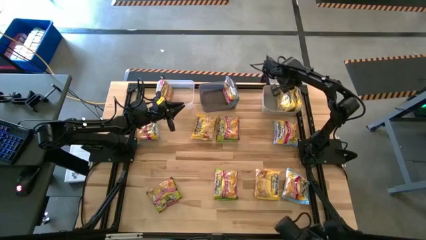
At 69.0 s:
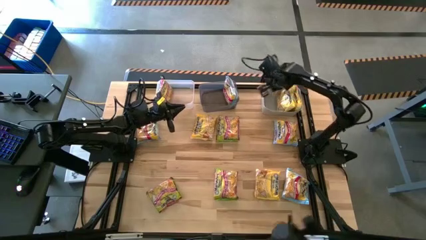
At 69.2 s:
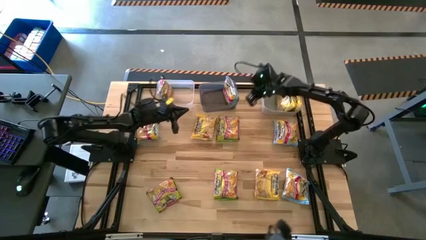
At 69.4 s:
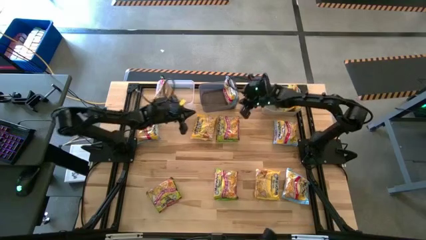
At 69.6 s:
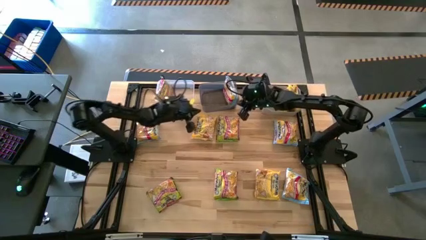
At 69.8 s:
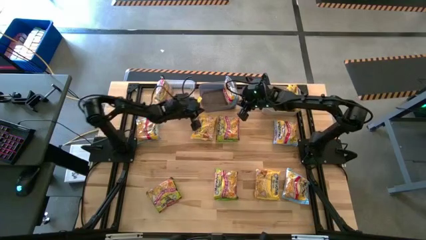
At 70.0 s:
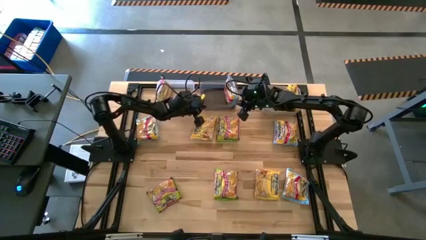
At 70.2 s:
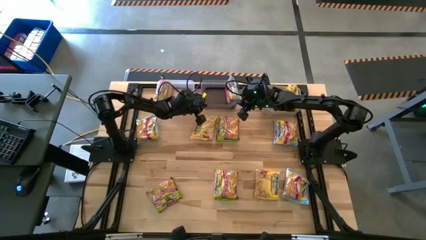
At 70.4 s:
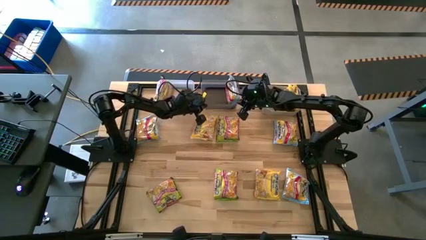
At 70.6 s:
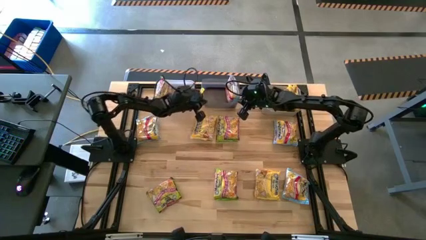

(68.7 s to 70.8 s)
Task: Sort Maruchan noodles
Adjust the black bin

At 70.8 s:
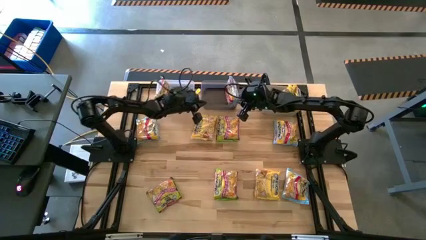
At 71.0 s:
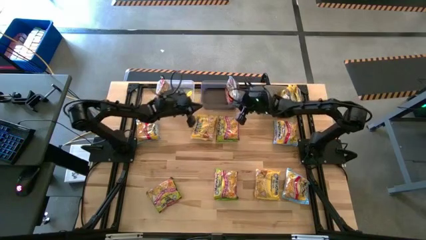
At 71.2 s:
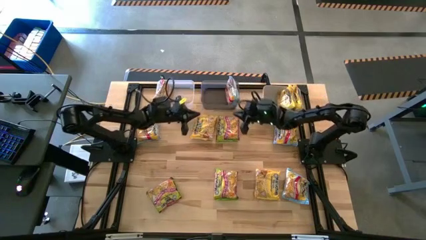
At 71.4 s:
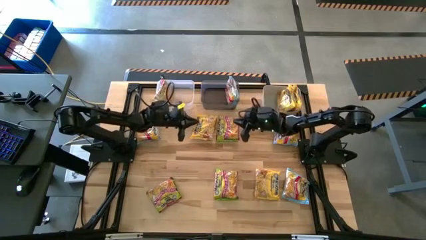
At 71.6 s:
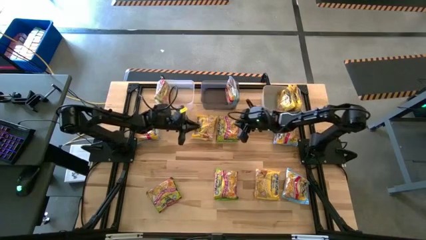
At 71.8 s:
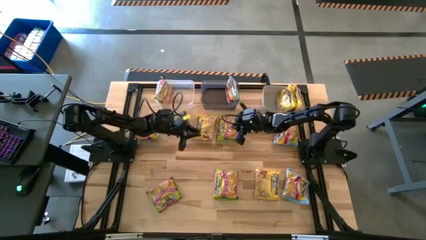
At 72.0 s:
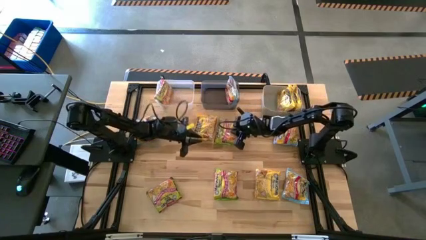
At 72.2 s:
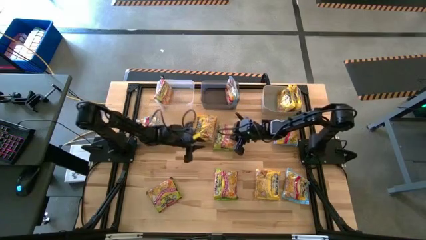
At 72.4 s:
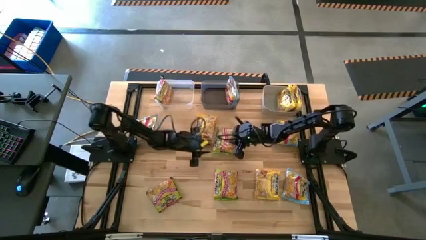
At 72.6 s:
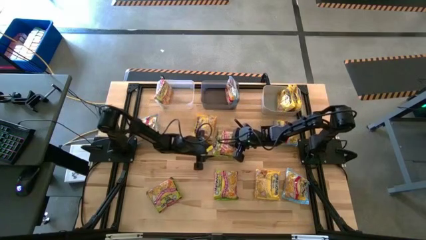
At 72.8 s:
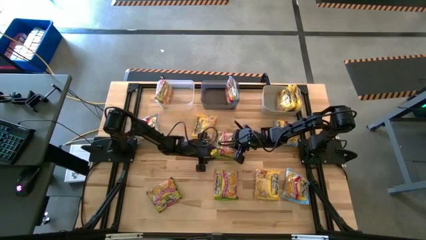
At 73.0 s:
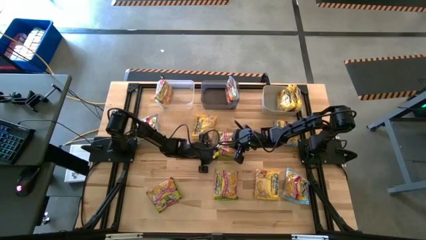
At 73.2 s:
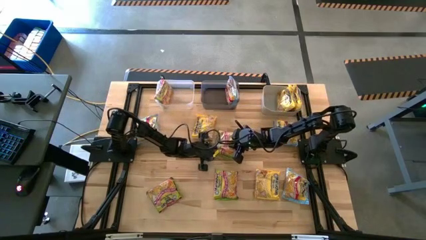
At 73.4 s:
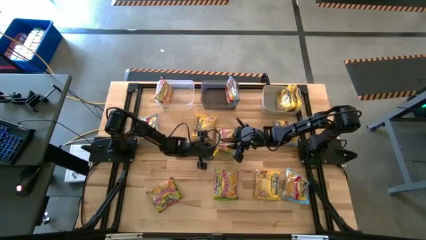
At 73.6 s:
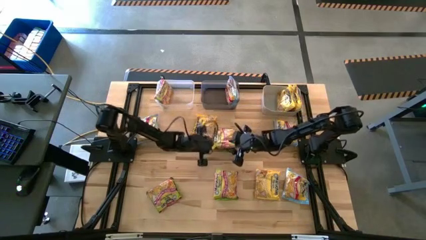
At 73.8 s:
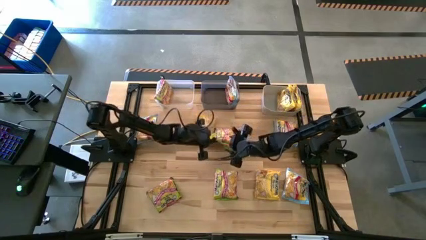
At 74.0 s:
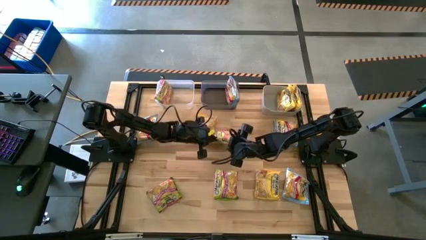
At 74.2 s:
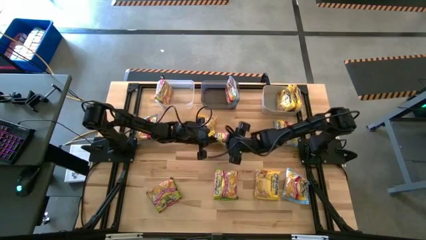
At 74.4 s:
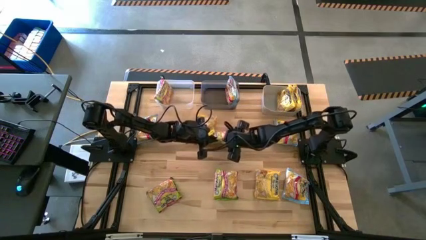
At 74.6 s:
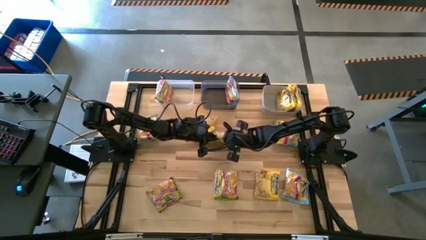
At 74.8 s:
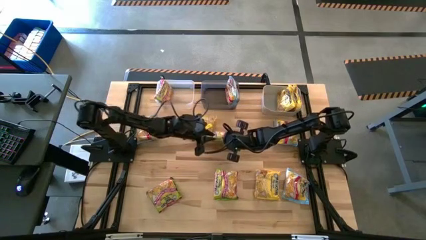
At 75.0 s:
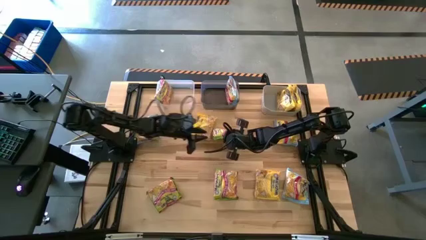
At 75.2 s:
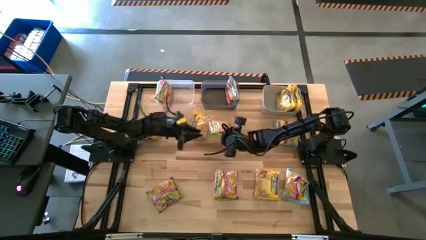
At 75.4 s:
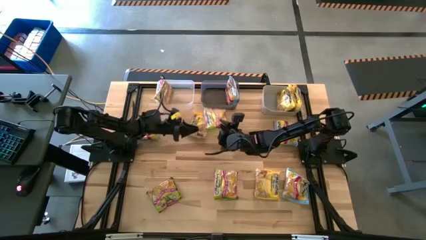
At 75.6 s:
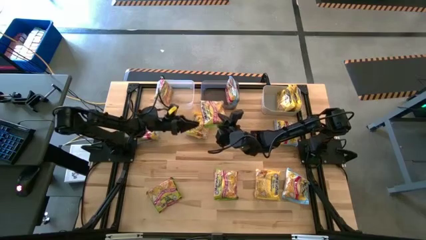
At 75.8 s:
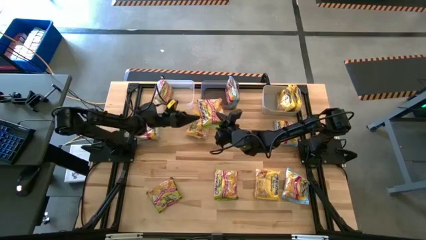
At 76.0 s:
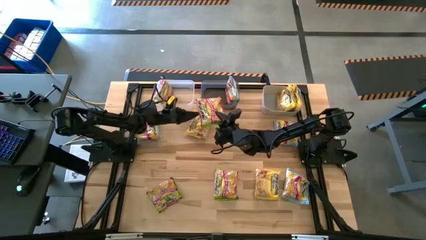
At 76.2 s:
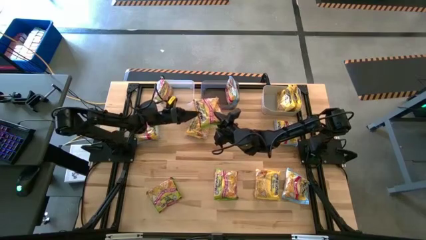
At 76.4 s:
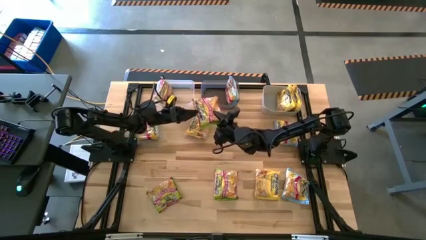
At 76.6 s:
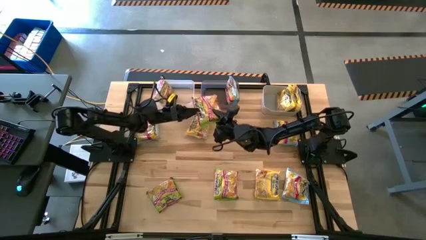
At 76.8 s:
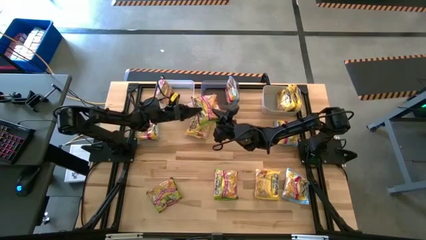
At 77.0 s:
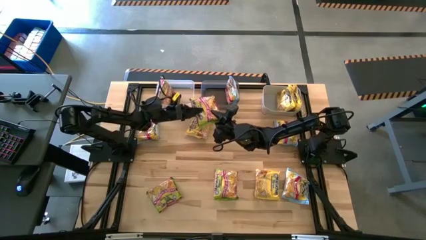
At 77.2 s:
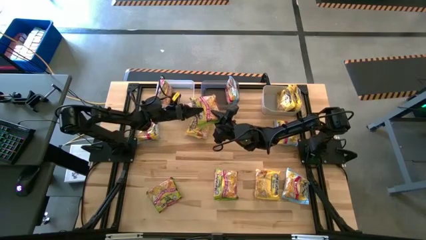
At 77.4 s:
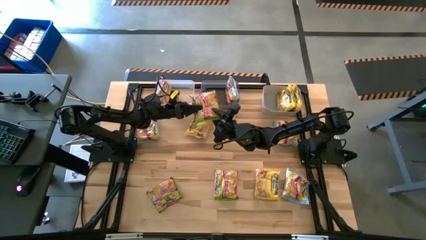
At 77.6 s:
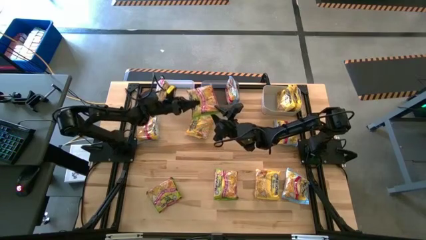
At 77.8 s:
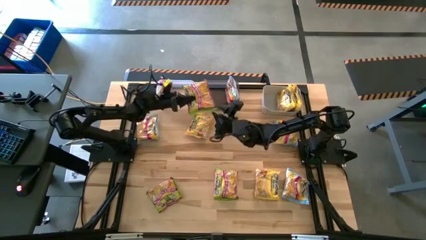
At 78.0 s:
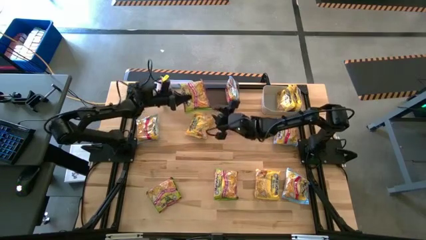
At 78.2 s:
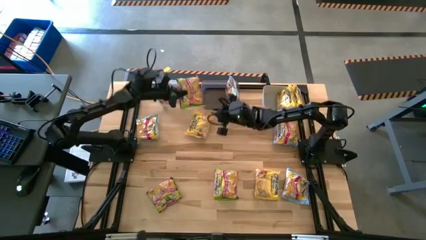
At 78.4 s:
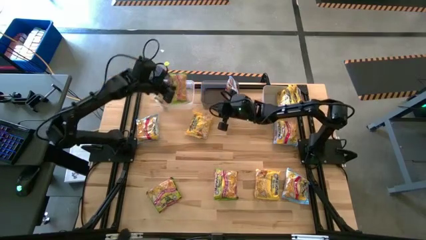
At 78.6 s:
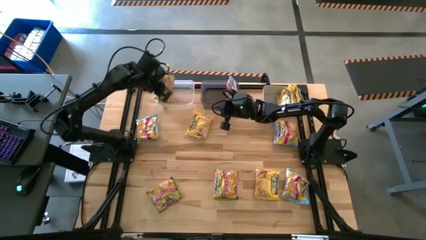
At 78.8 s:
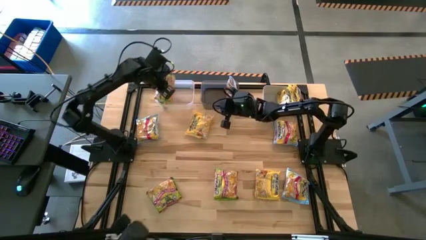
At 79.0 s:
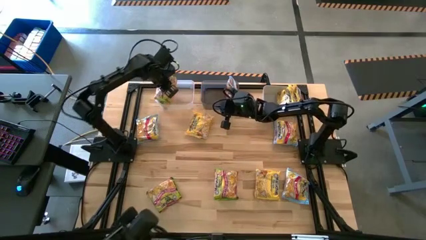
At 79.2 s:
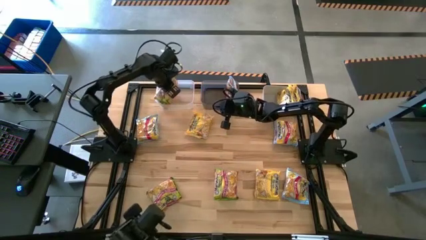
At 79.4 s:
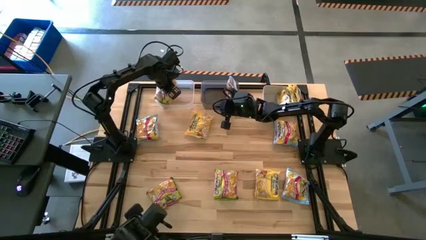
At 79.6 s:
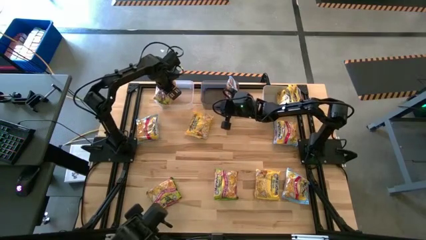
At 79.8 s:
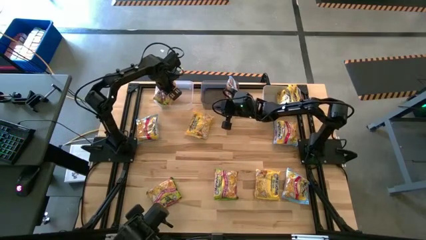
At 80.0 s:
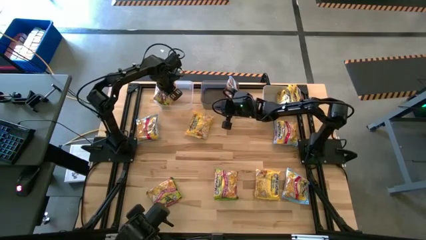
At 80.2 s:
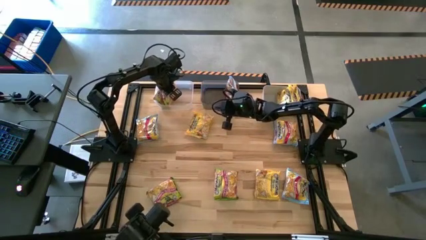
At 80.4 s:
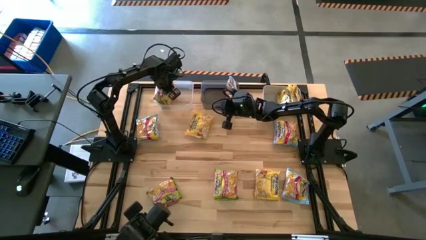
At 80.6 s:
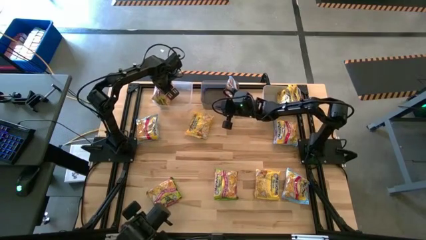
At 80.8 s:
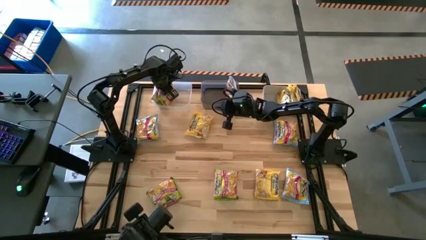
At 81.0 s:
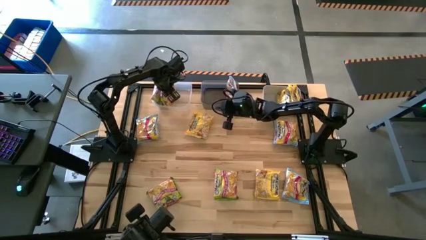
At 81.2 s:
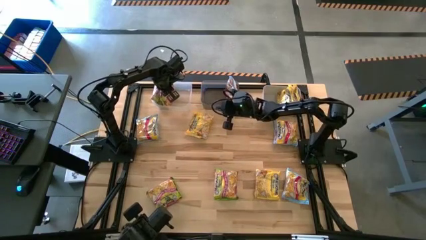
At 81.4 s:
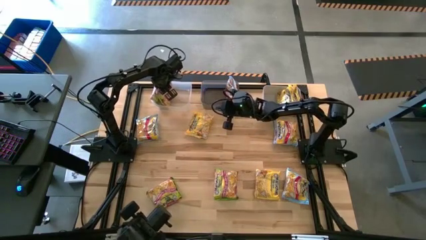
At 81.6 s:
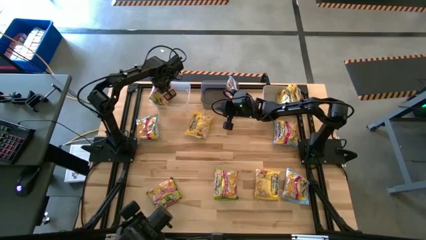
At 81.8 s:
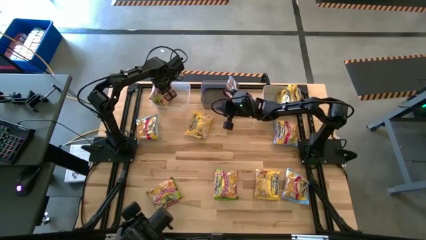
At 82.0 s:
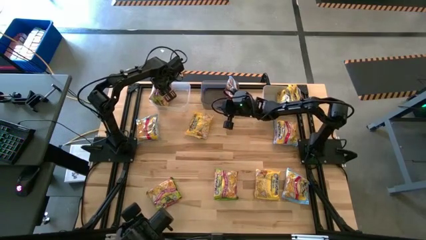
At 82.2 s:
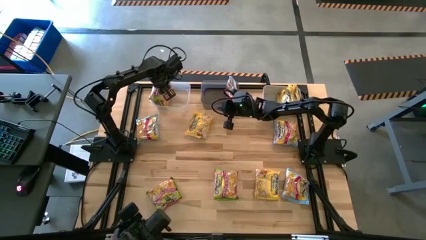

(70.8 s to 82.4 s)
Put the top green noodle pack into the transparent bin

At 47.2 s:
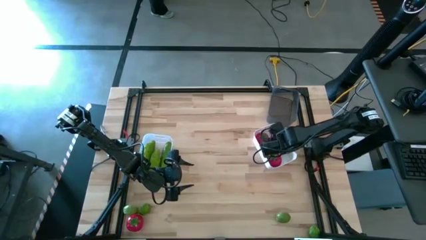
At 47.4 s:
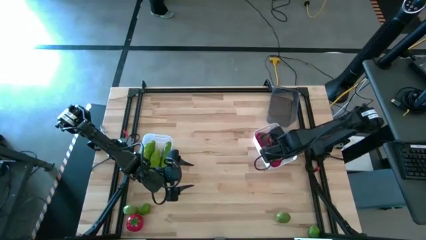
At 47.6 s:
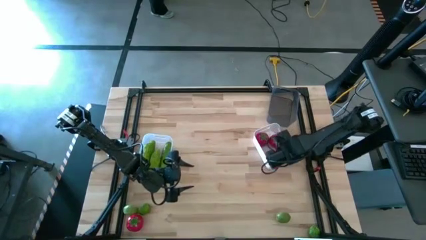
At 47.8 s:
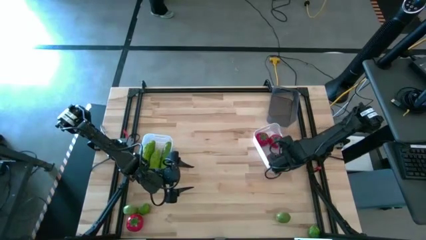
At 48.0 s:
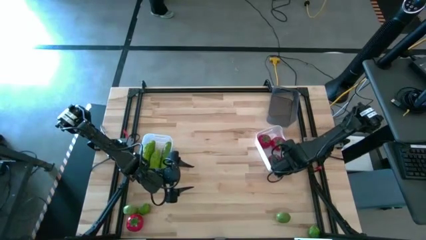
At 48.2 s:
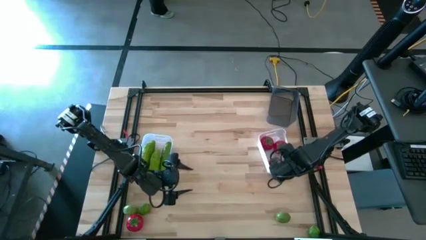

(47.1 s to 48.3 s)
Task: Sort produce into baskets
Adjust the white bin
